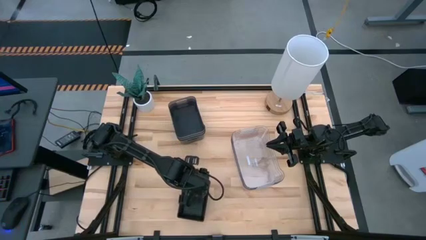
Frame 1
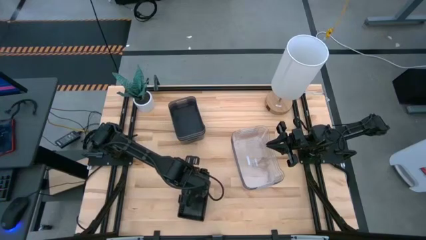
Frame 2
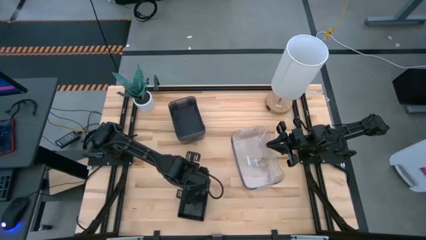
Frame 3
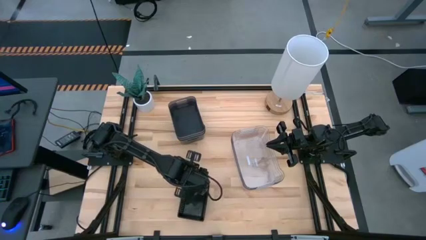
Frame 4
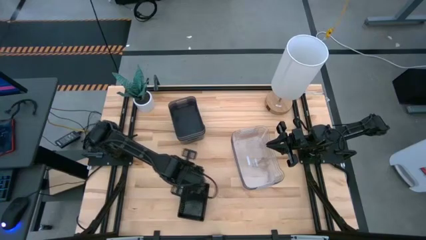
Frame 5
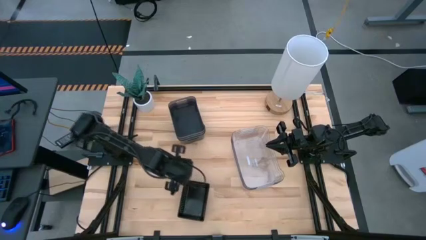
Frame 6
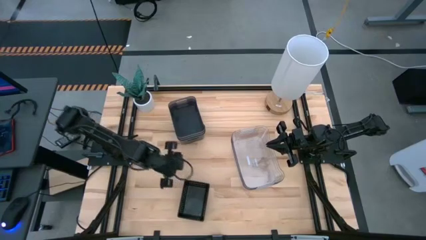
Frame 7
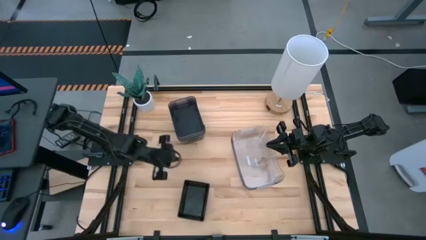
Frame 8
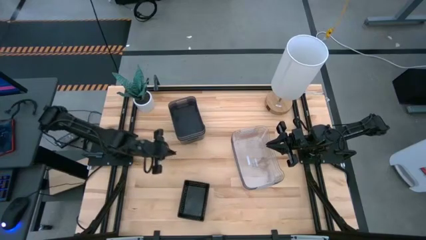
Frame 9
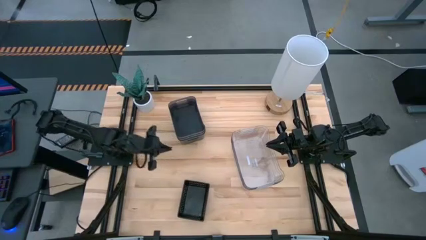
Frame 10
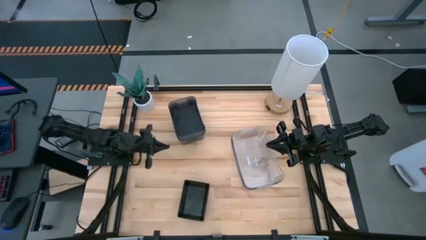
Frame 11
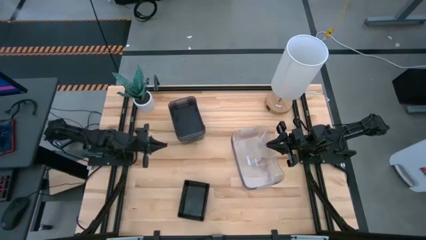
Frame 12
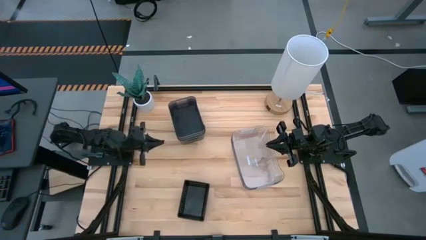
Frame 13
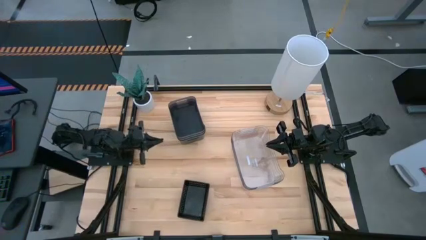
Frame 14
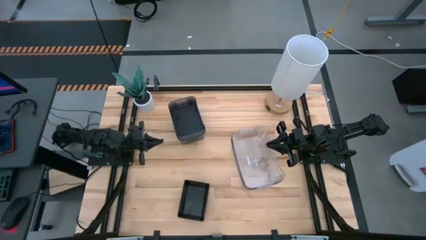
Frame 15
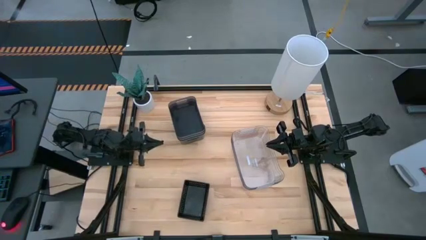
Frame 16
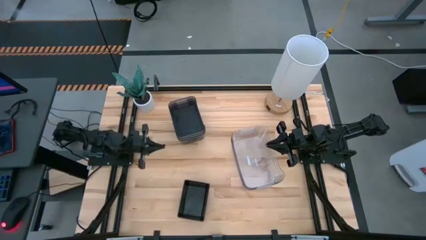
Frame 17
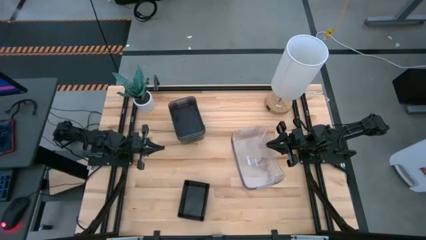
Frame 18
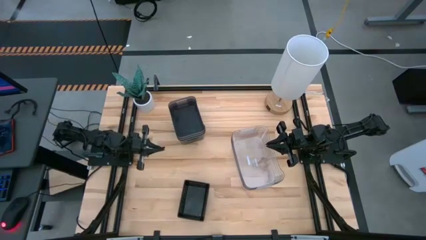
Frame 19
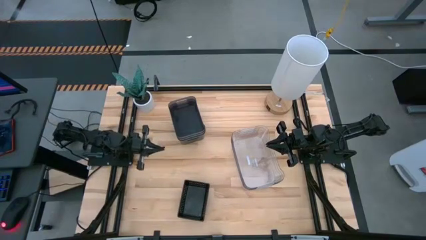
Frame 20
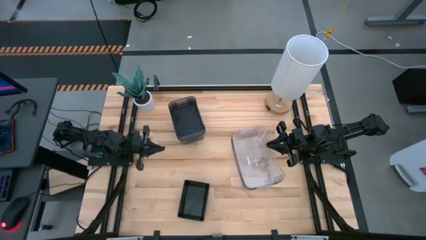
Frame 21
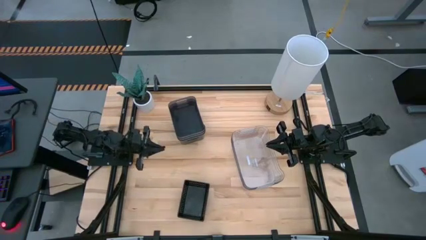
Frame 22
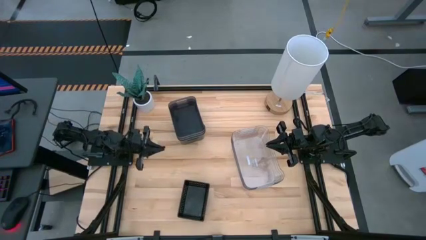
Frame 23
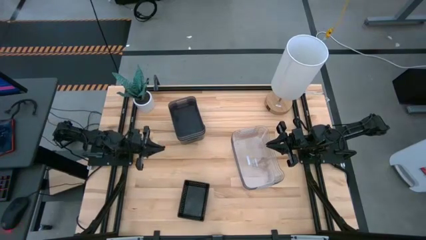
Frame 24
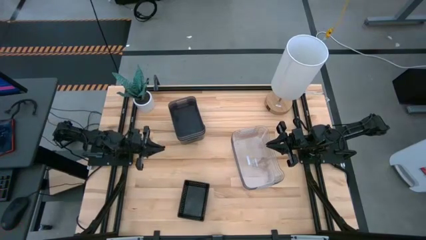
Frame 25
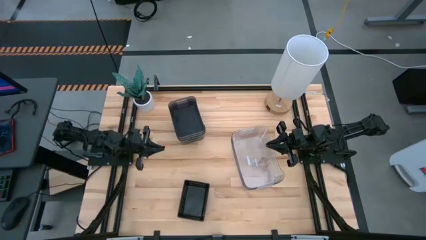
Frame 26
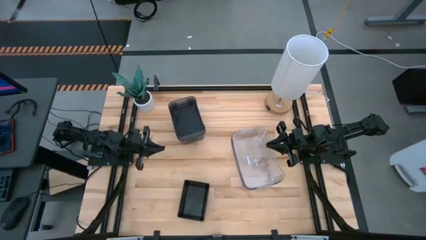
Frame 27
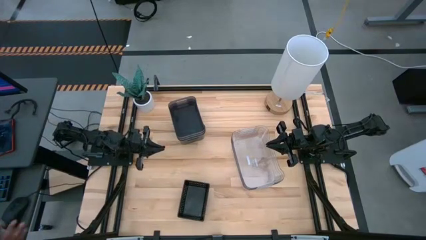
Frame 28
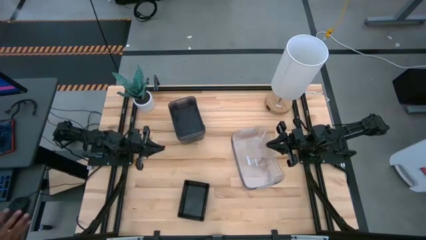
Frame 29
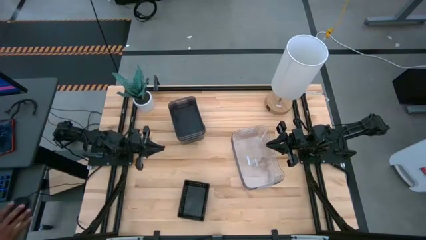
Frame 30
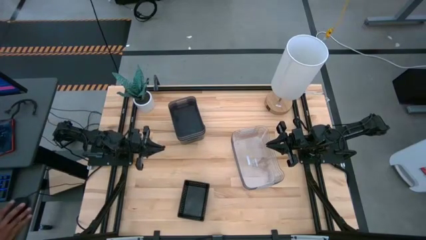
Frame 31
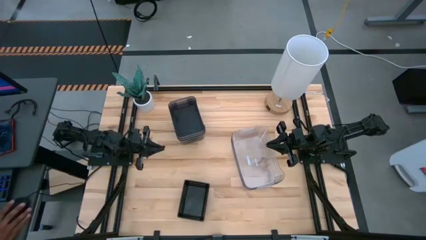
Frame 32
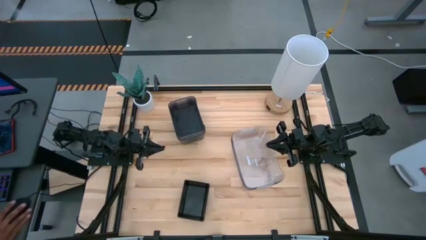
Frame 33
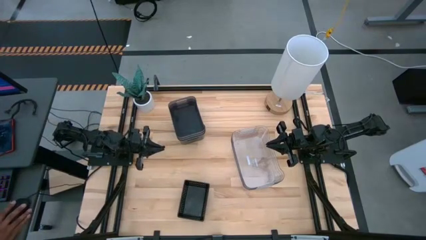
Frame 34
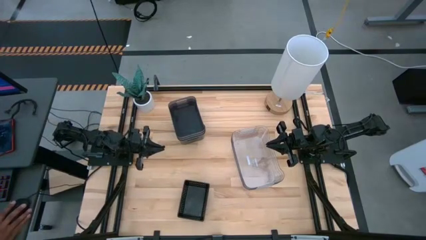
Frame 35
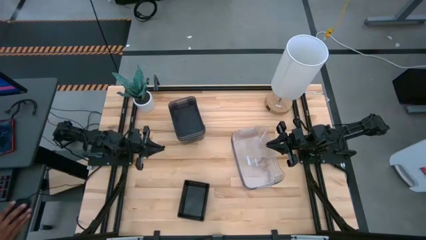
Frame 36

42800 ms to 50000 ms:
Return to Home Position

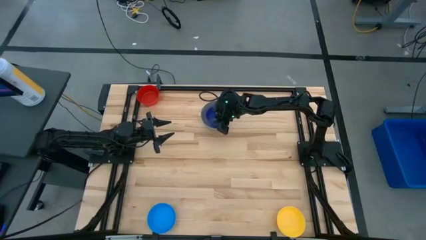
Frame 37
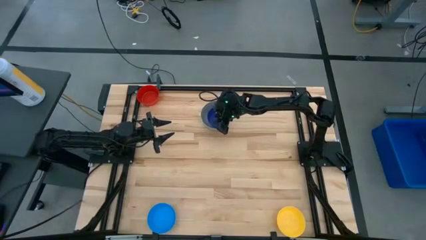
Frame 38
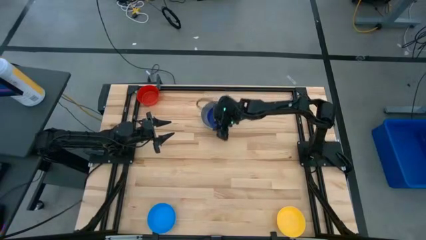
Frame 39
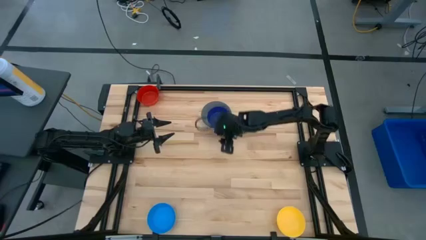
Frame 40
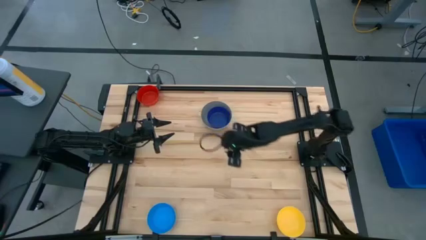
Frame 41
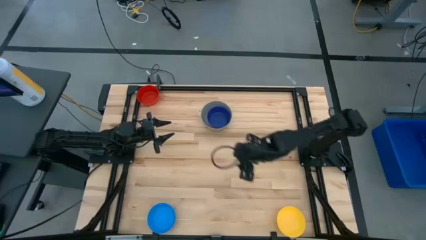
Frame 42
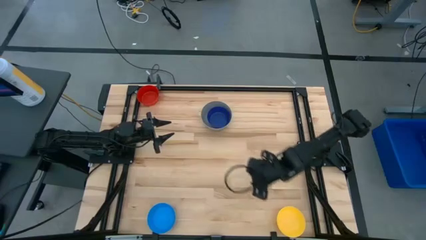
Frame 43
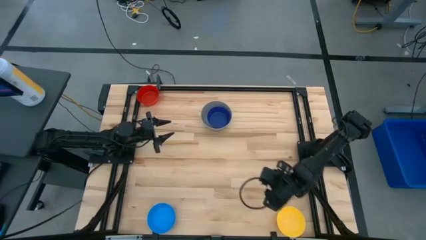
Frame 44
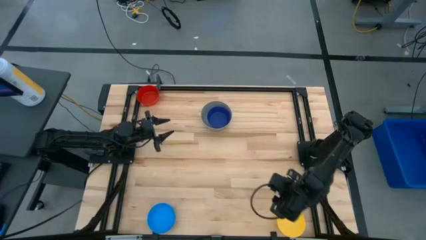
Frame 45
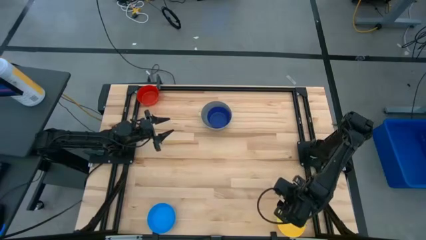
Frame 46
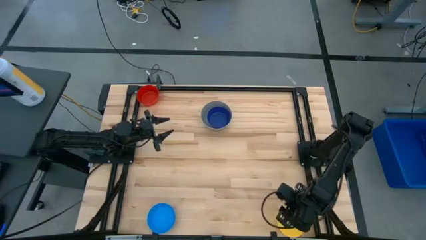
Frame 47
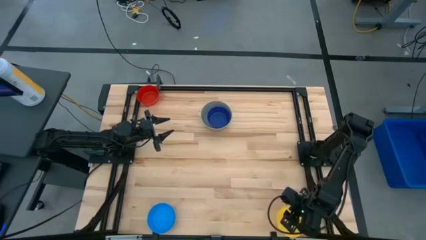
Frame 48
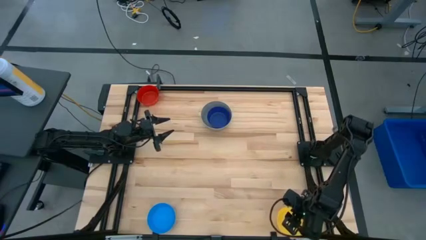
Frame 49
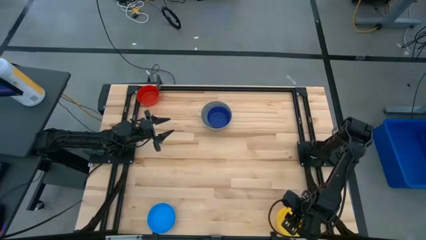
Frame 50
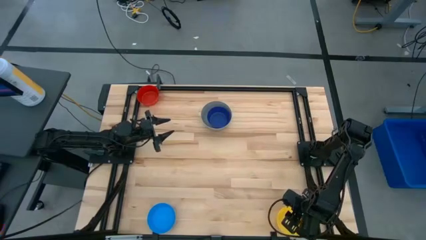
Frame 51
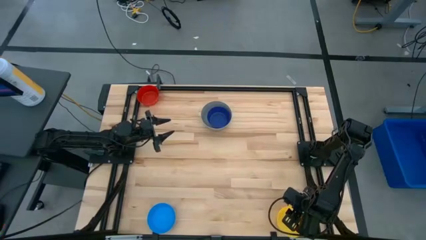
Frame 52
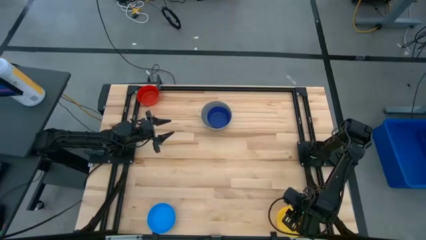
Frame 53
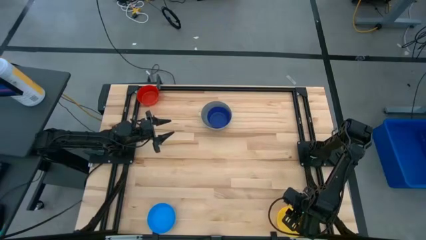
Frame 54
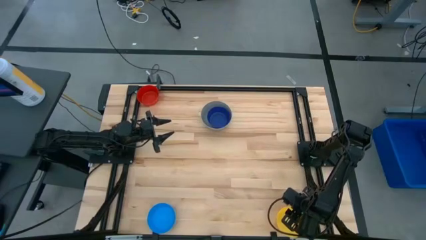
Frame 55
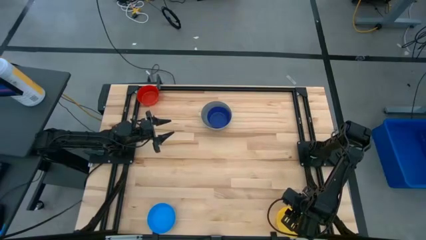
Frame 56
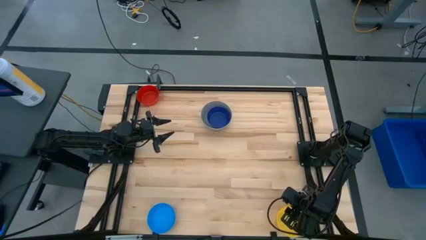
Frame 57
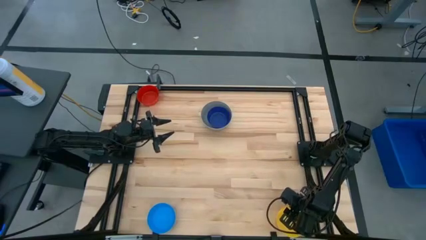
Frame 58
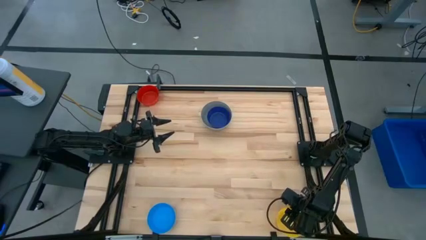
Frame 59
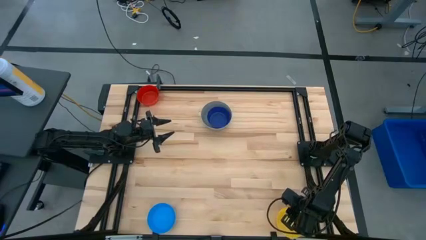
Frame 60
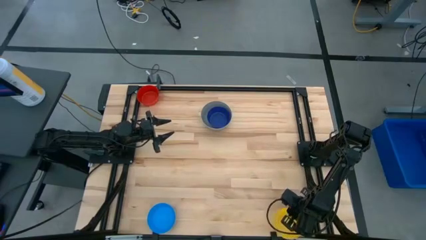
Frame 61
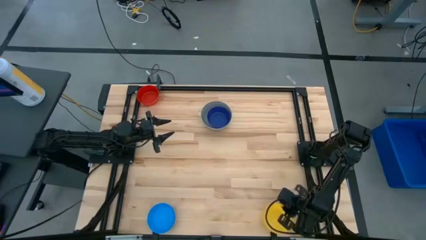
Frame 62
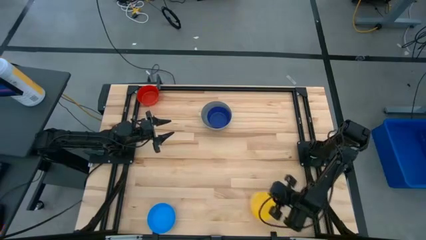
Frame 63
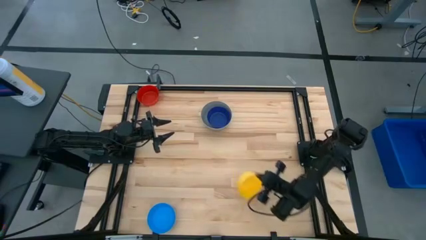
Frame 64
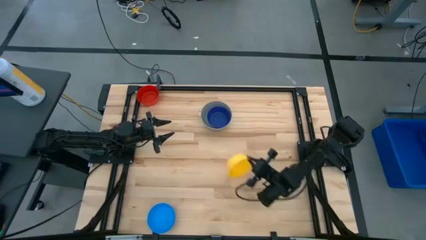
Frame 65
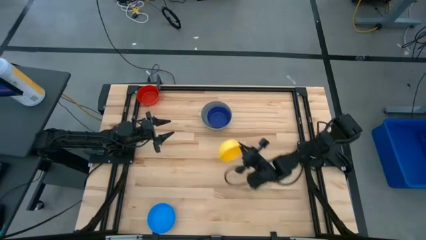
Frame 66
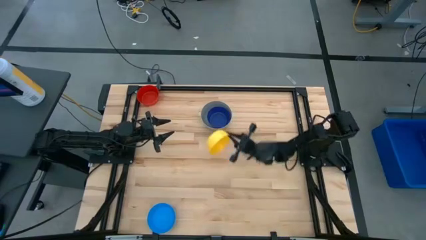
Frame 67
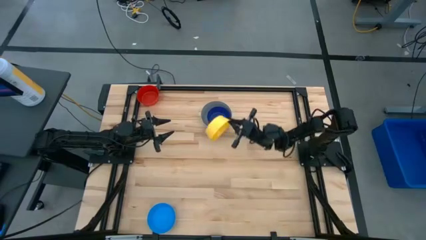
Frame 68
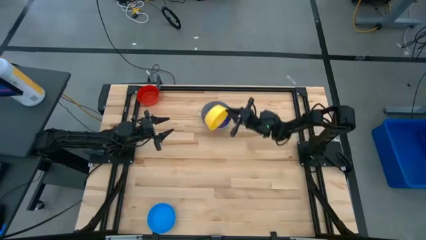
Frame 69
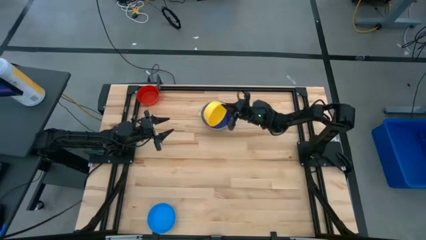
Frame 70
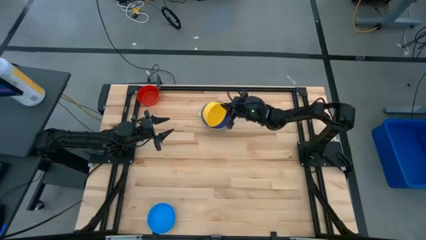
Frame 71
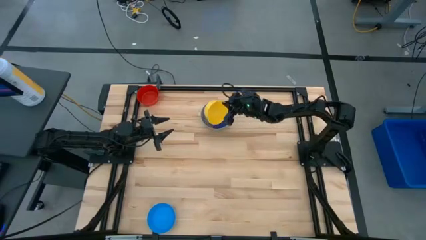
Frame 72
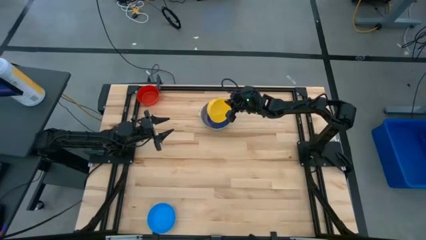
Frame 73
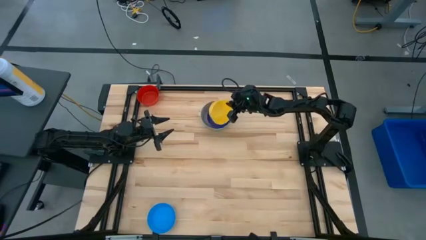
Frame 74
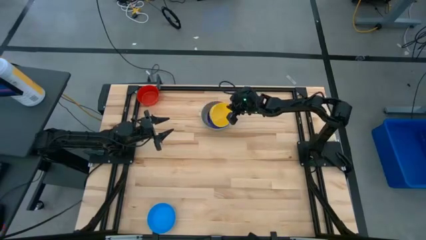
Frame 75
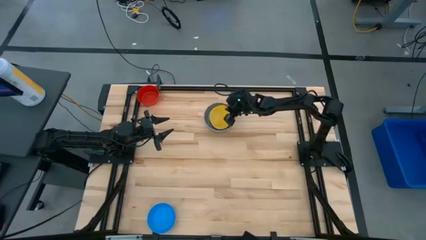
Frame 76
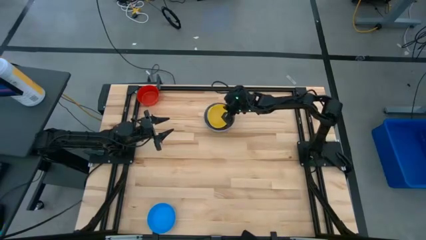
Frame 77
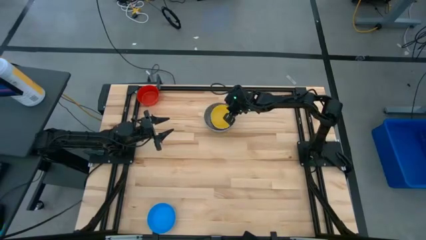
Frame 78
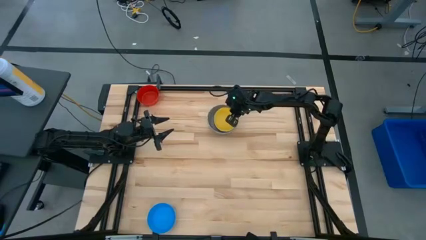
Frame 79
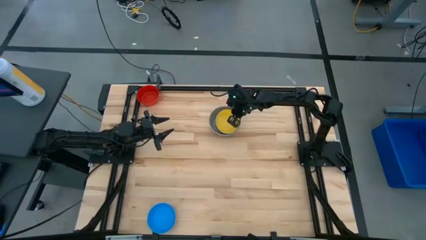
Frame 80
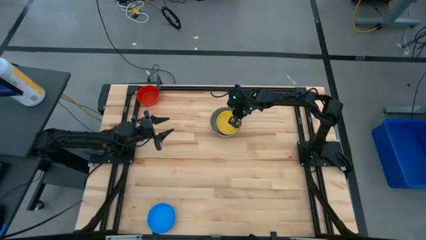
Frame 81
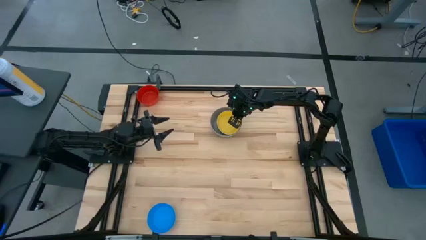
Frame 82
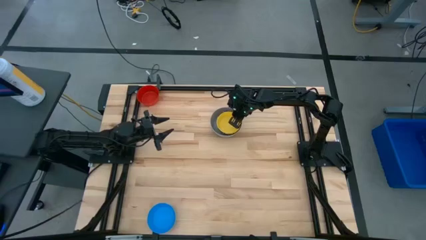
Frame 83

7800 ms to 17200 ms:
Stack the yellow bowl on top of the blue bowl
